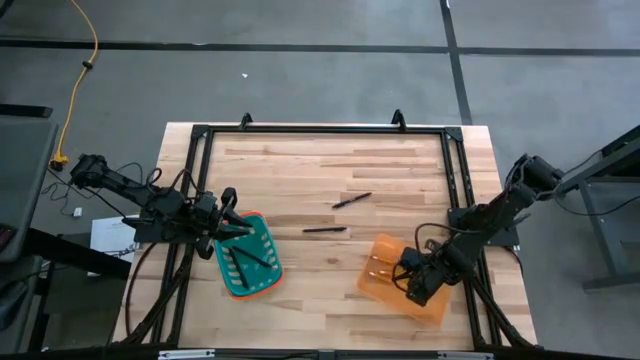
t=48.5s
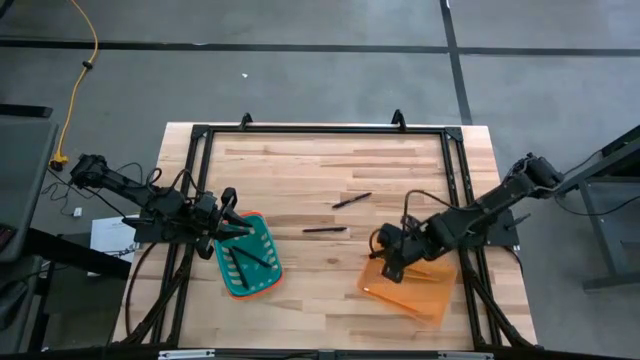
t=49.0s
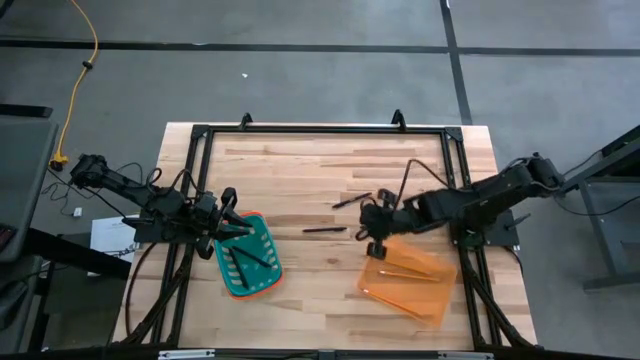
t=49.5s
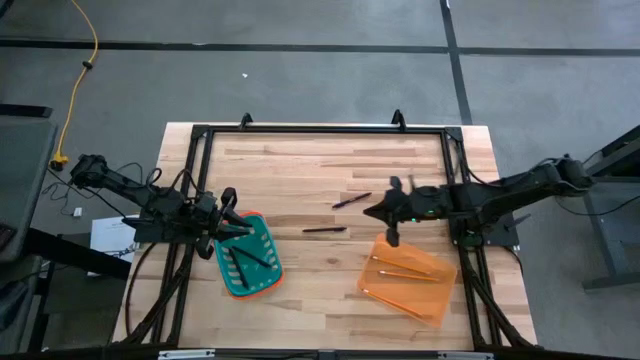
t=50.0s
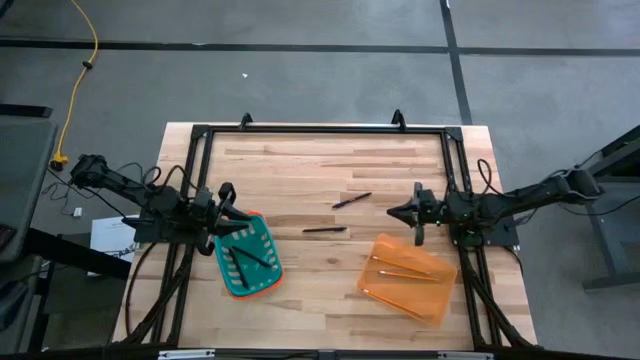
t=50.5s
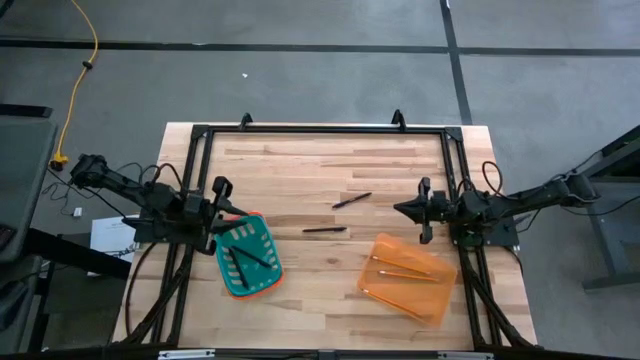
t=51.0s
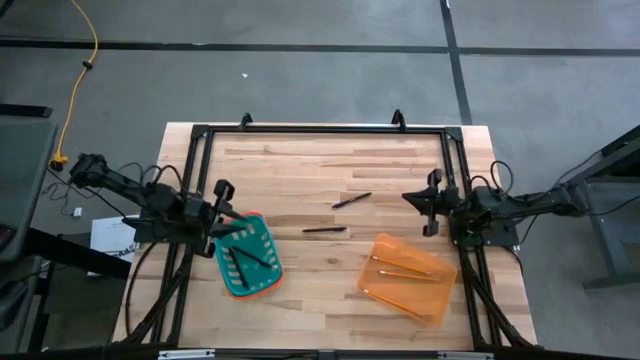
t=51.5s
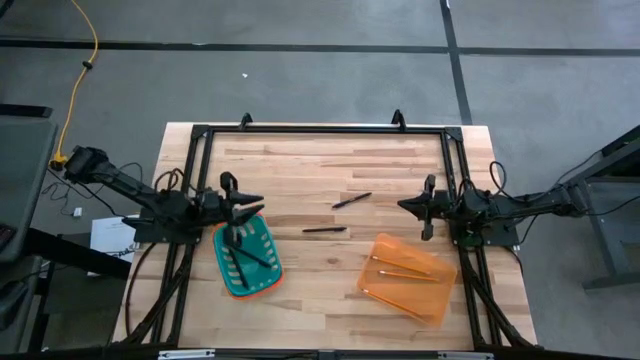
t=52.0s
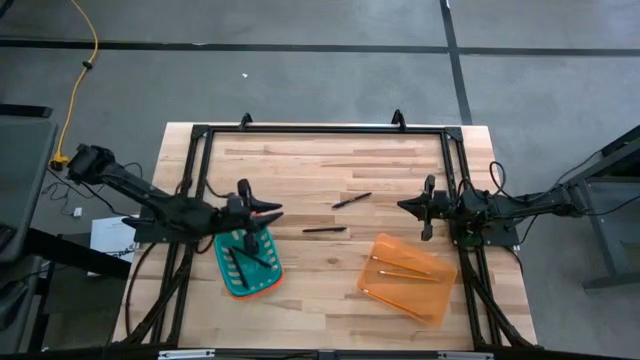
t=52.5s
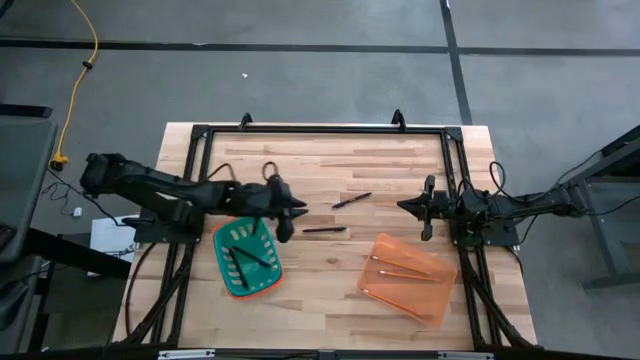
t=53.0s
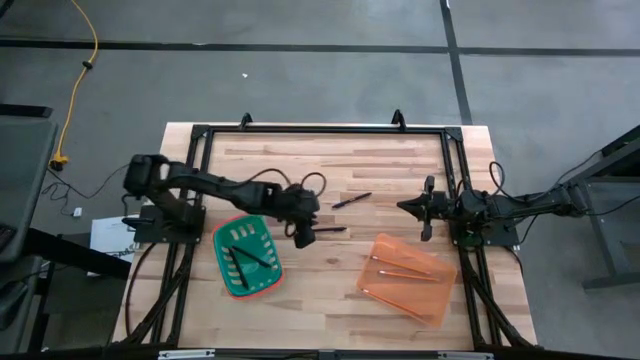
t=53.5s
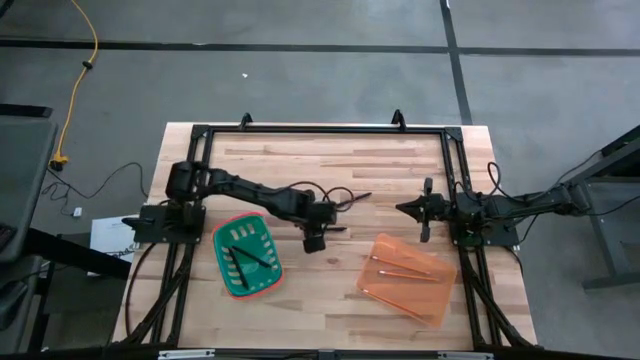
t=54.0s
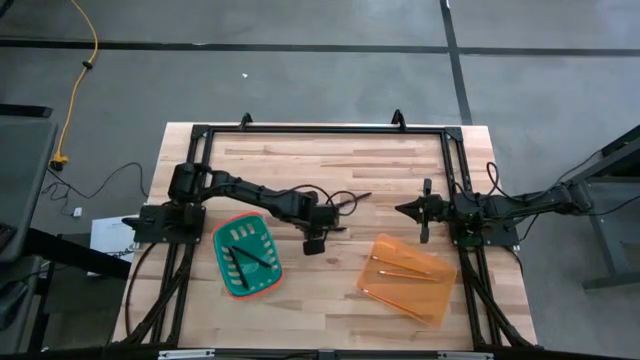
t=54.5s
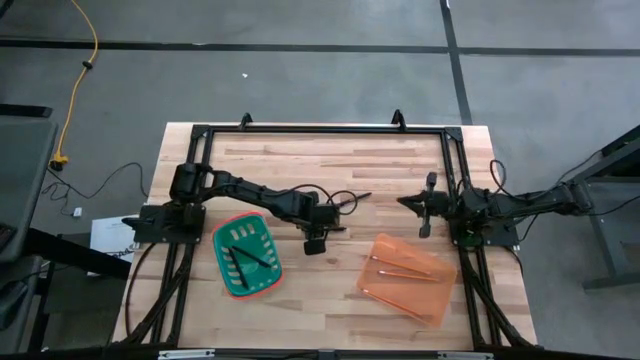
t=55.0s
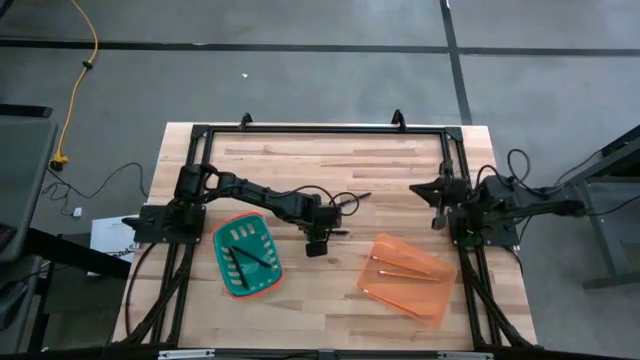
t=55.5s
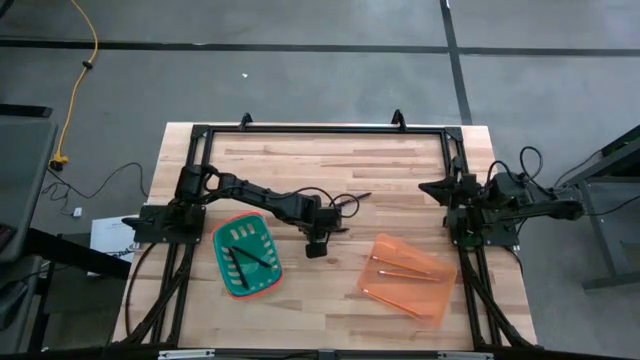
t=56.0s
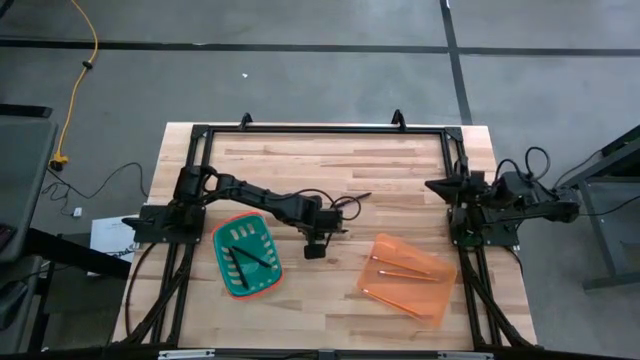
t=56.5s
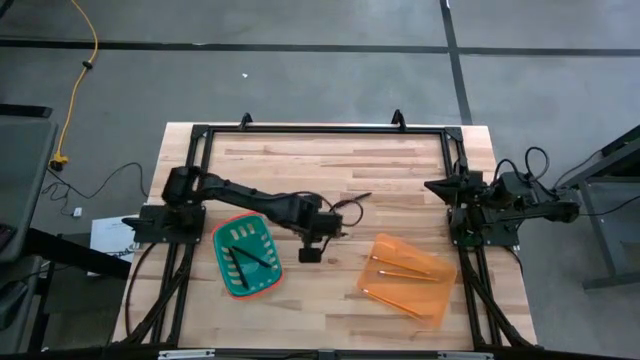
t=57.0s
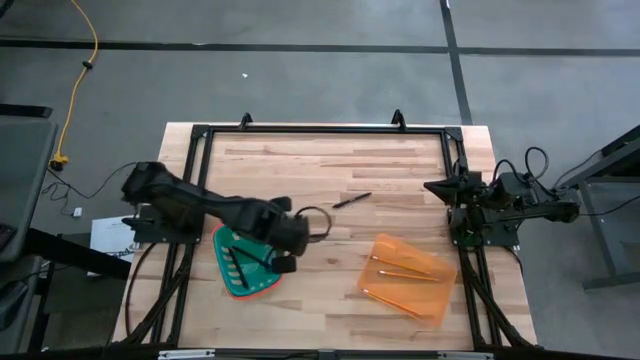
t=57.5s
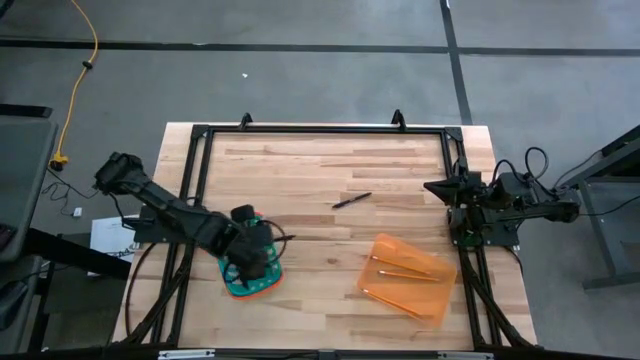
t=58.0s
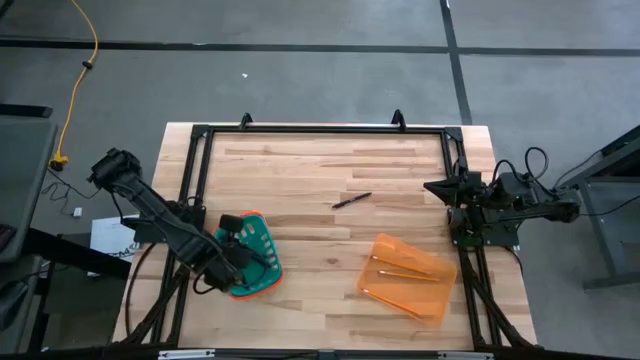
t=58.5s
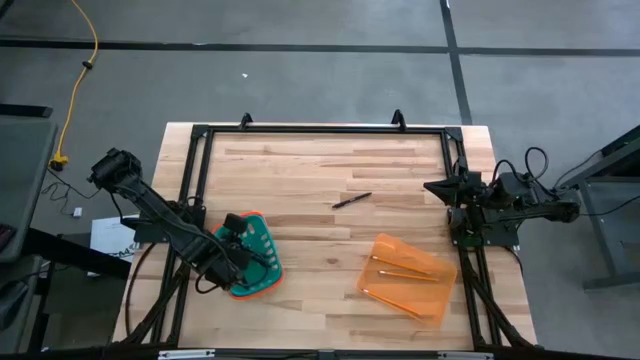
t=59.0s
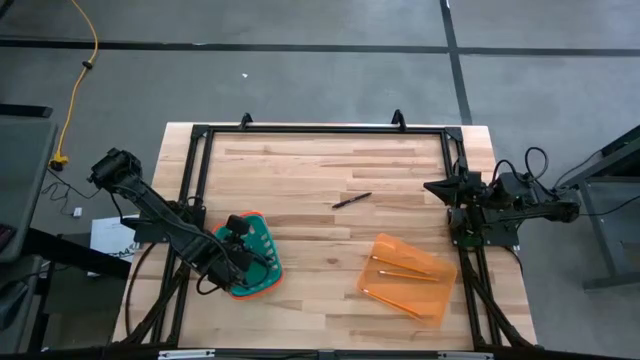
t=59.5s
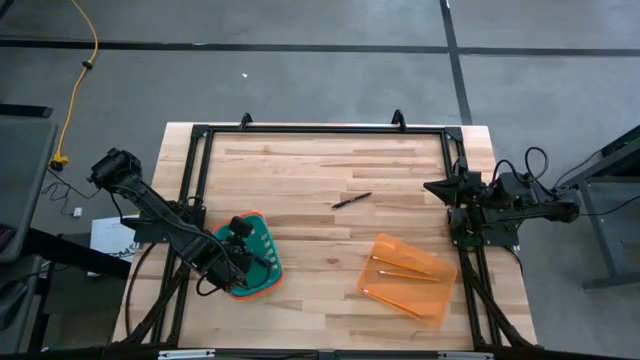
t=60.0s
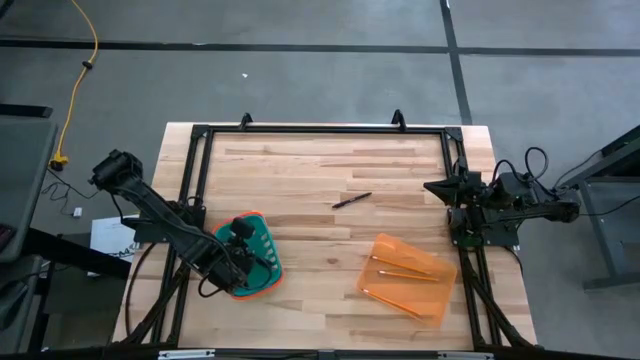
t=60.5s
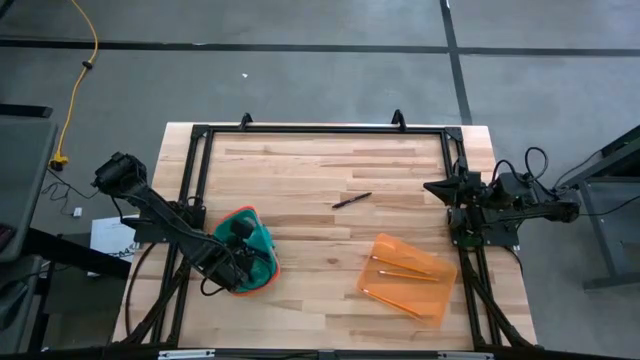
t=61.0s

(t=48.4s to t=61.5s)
Task: Sort pens & pencils
Put the black pen into the blue bin

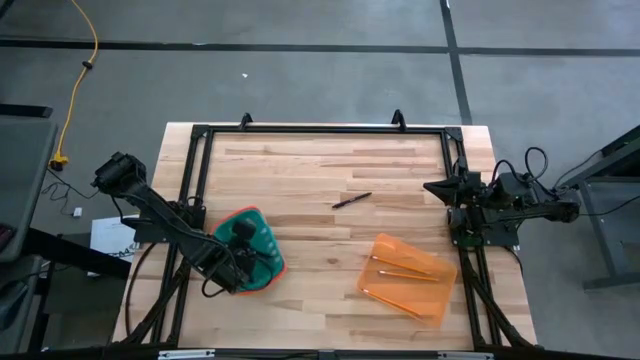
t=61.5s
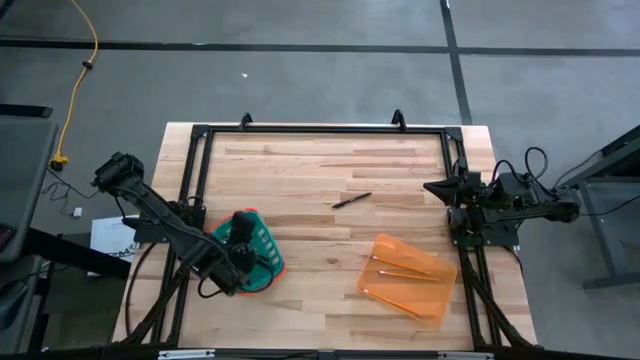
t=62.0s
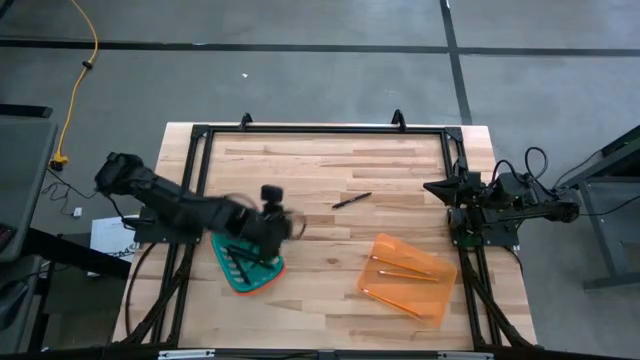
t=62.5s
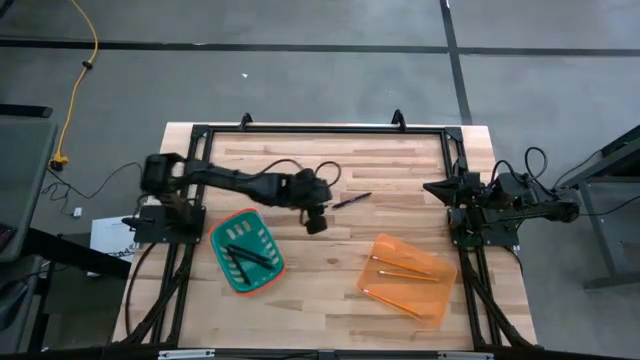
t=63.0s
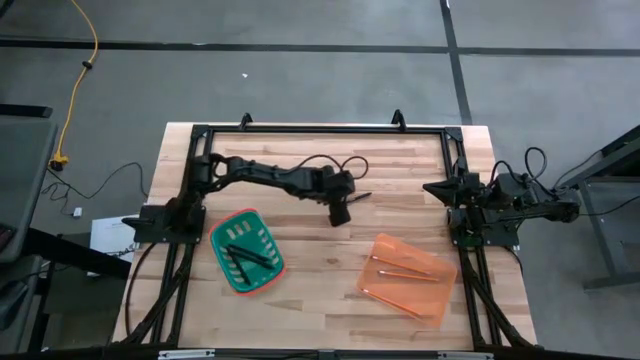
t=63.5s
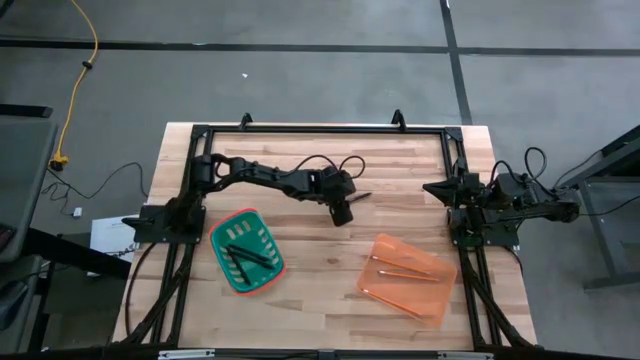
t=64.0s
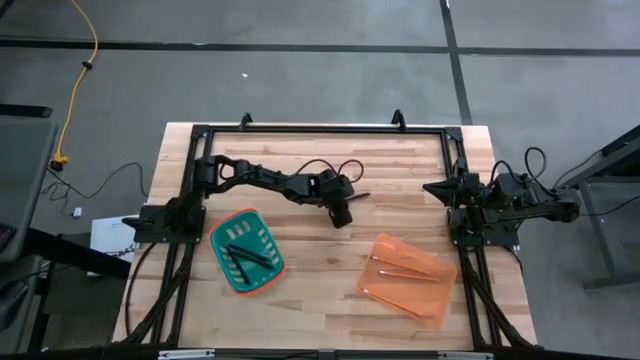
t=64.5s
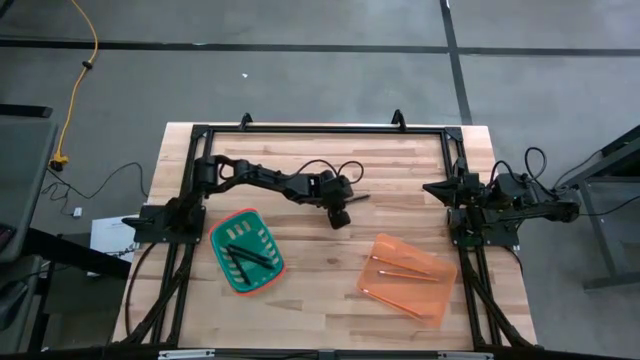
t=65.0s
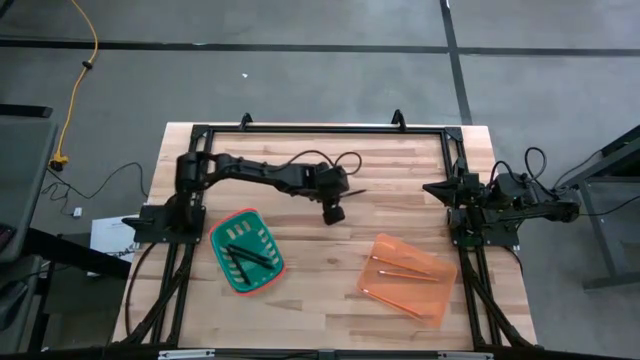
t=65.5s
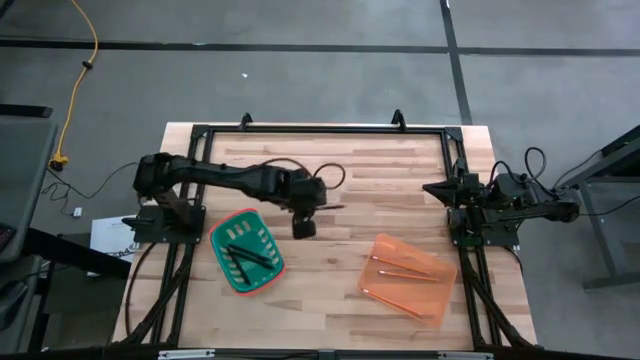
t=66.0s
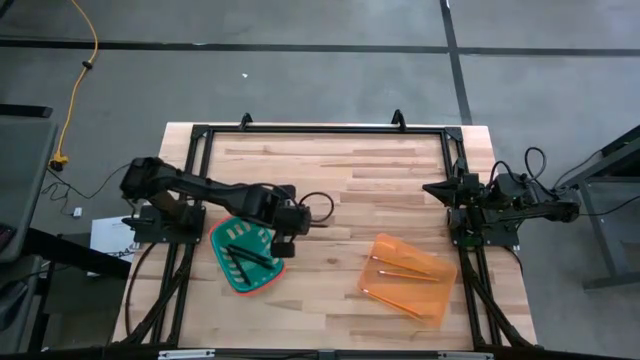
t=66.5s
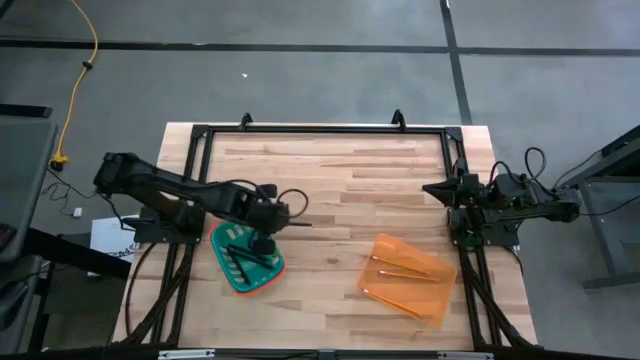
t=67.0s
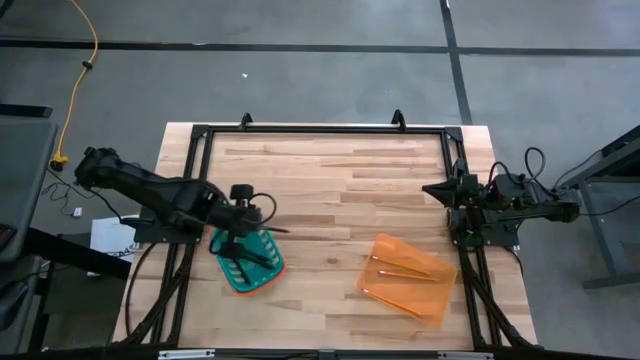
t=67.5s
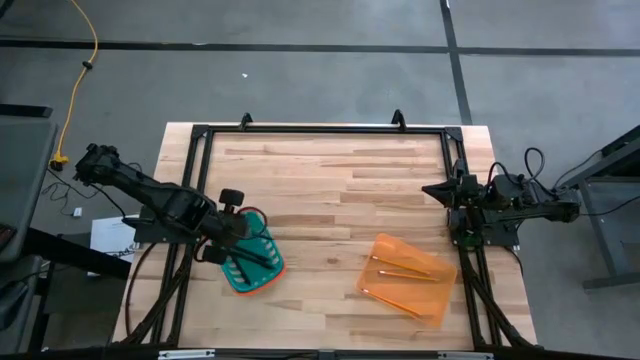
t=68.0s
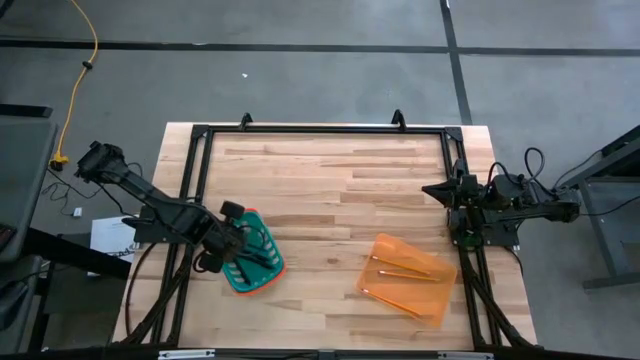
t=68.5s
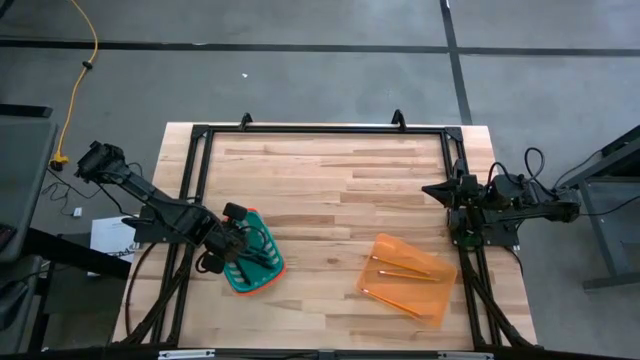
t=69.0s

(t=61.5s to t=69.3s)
Put the black pen into the blue bin
